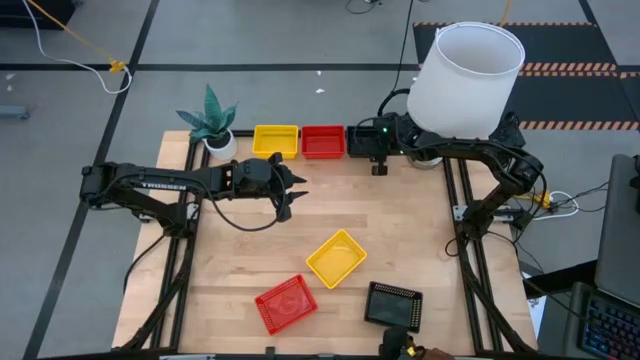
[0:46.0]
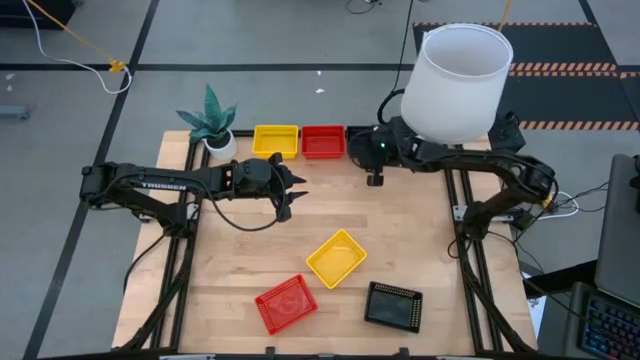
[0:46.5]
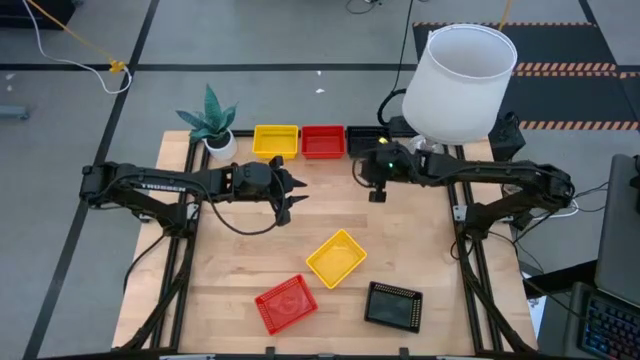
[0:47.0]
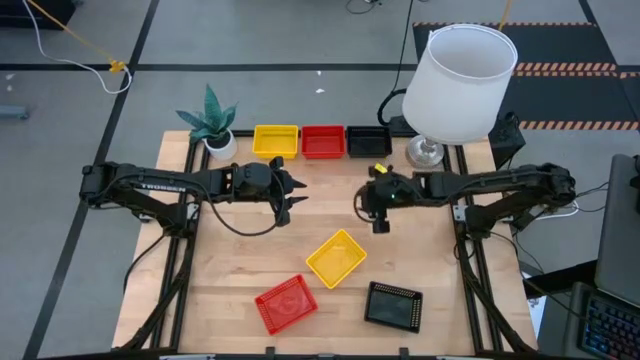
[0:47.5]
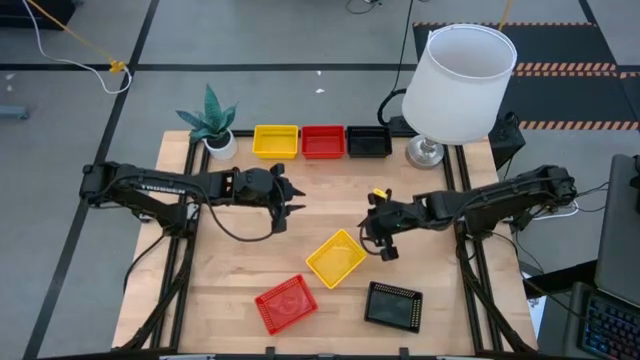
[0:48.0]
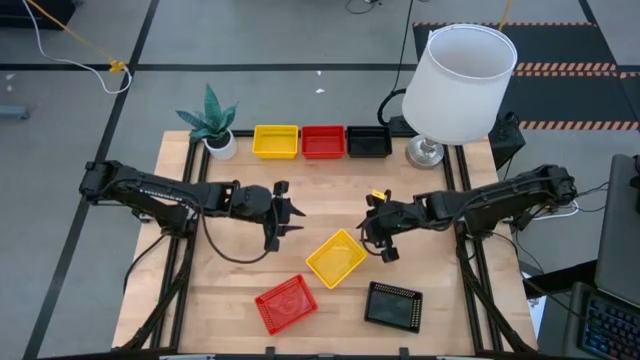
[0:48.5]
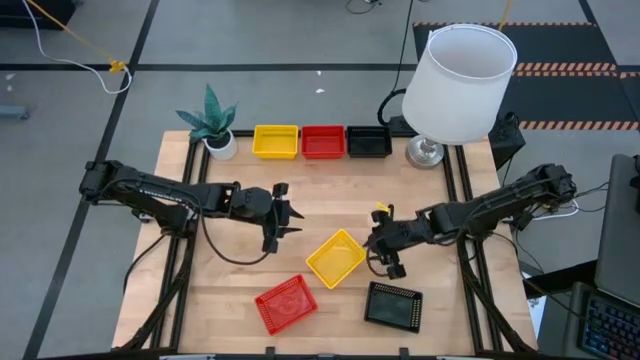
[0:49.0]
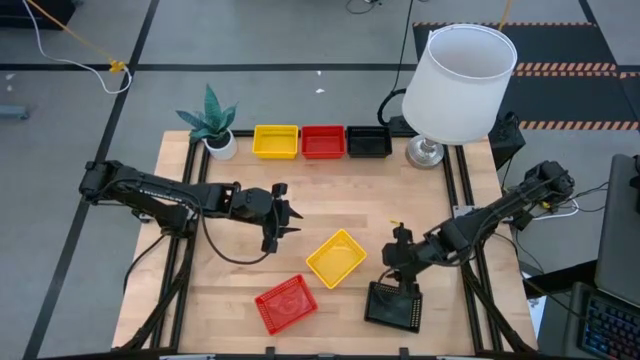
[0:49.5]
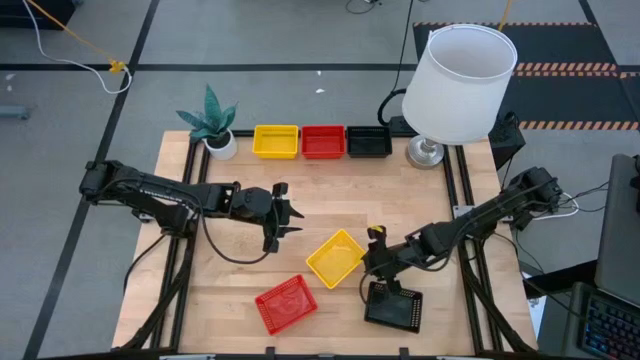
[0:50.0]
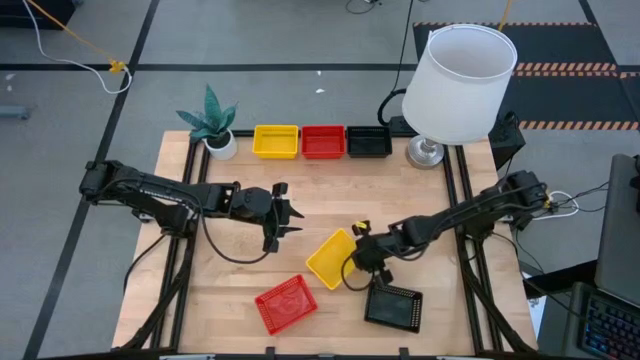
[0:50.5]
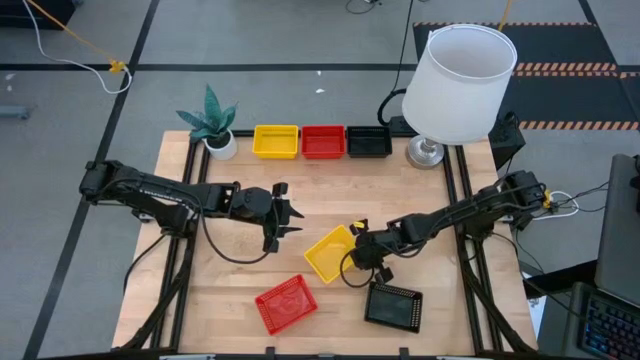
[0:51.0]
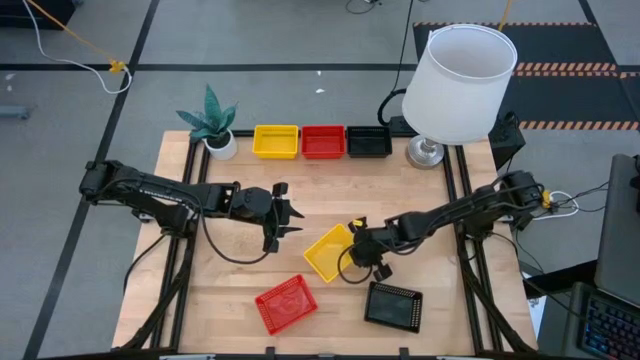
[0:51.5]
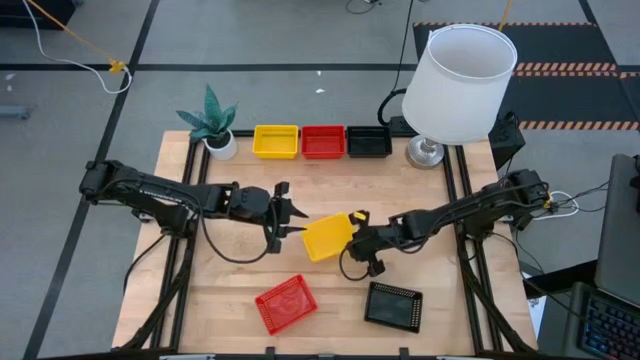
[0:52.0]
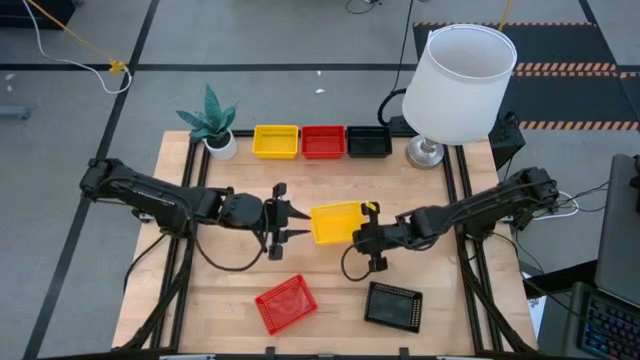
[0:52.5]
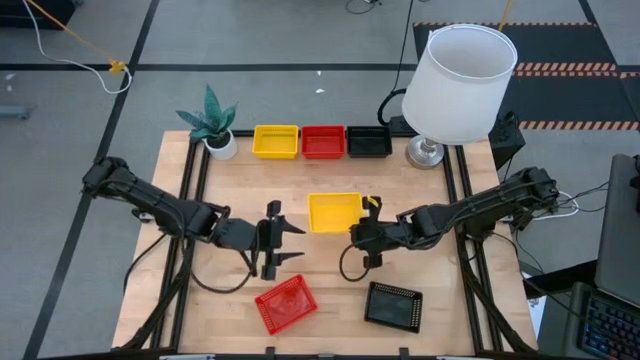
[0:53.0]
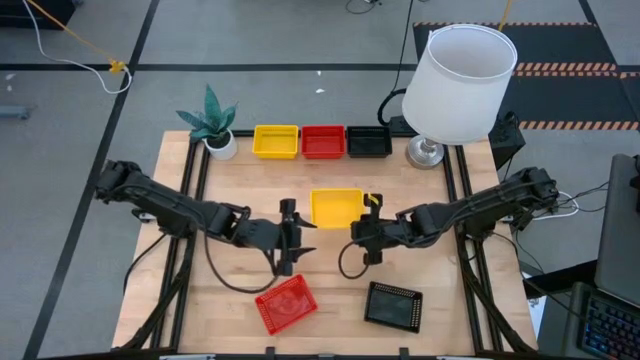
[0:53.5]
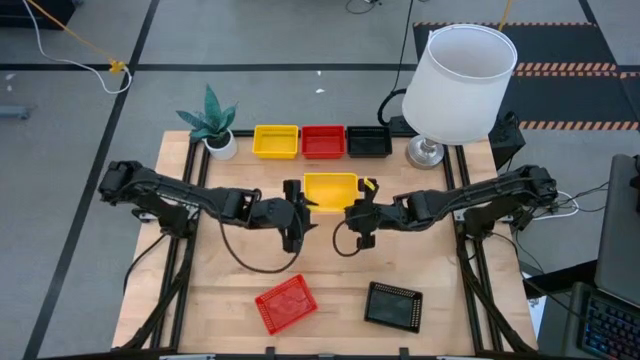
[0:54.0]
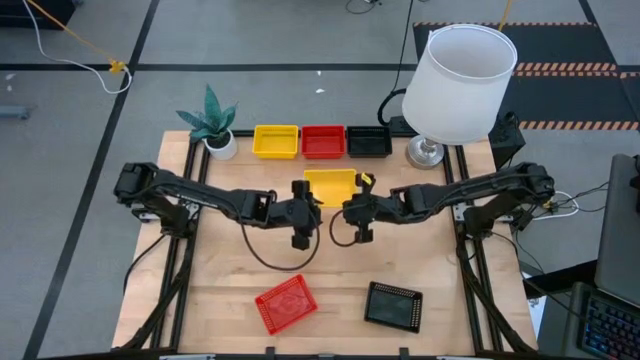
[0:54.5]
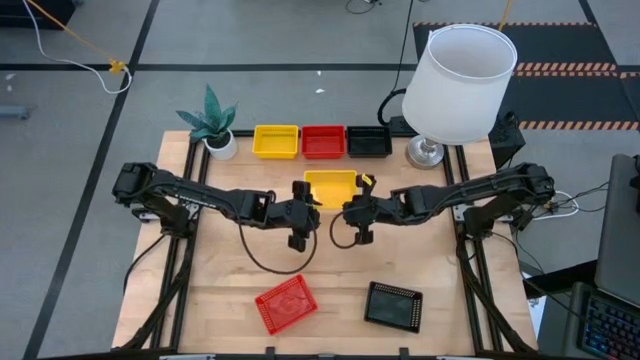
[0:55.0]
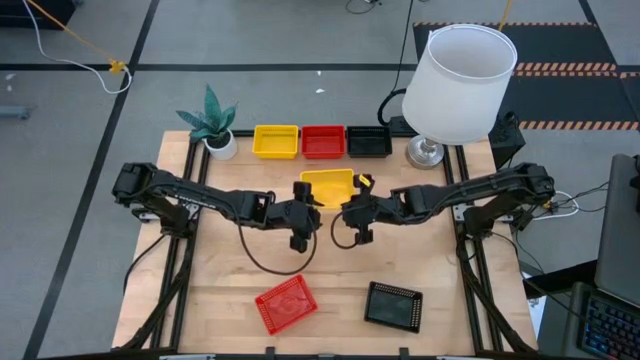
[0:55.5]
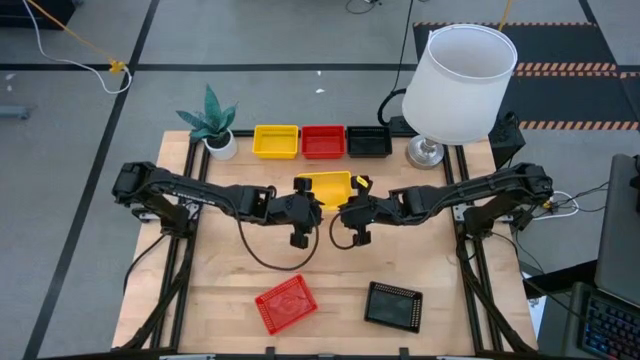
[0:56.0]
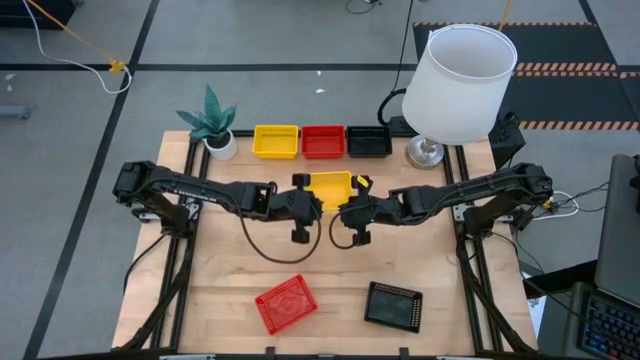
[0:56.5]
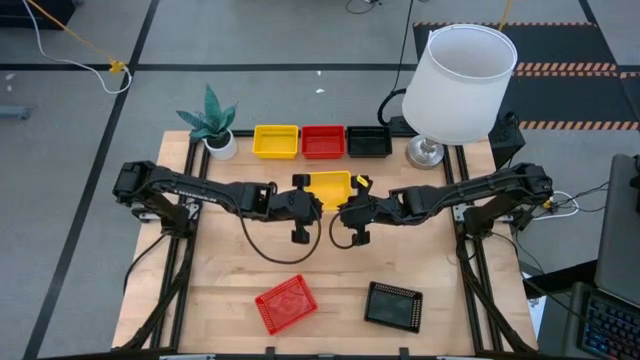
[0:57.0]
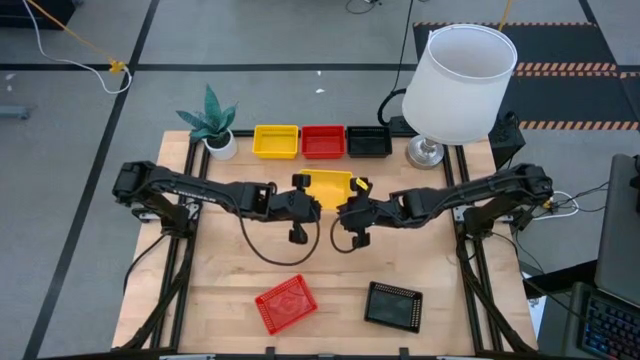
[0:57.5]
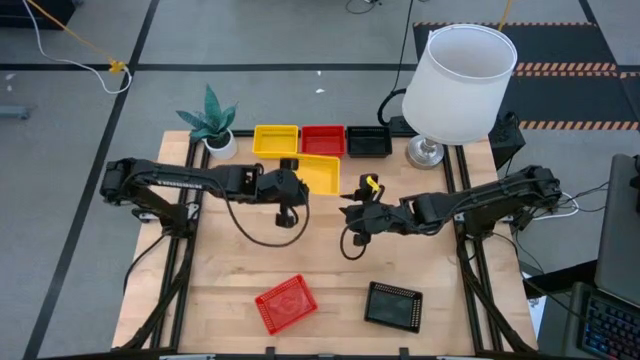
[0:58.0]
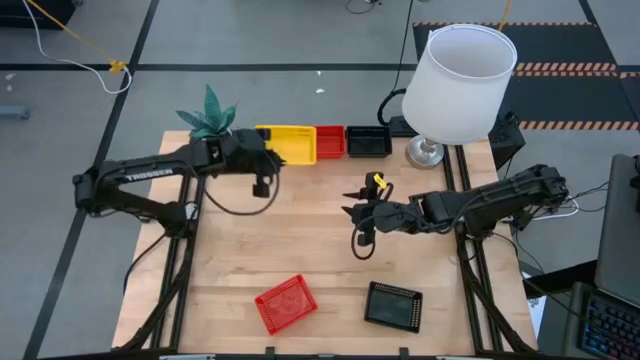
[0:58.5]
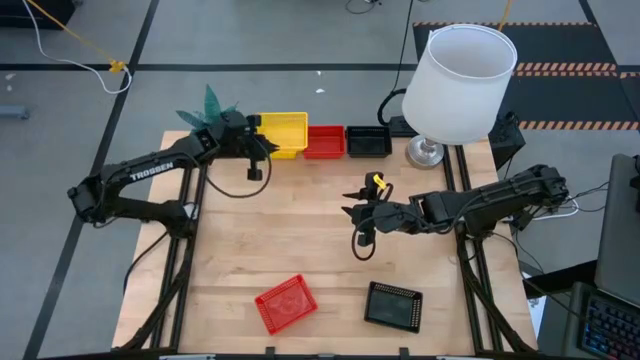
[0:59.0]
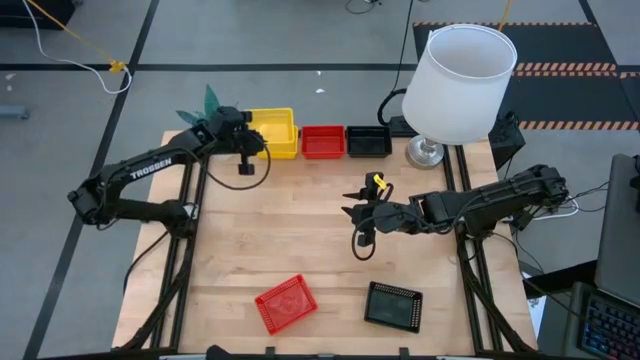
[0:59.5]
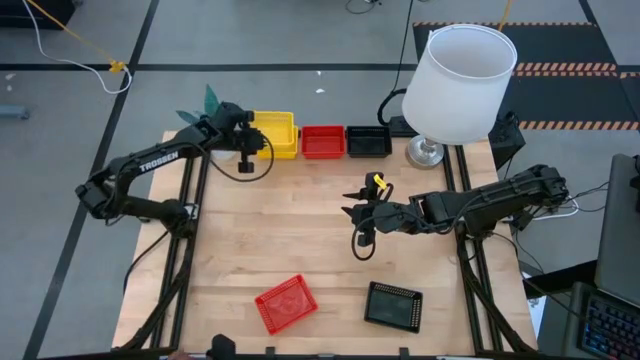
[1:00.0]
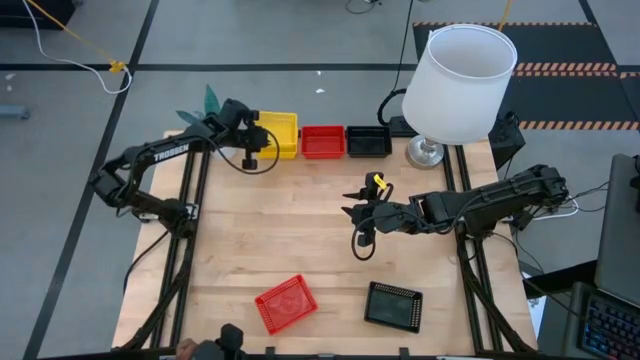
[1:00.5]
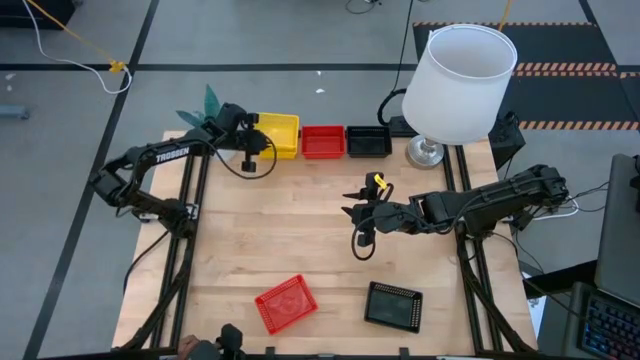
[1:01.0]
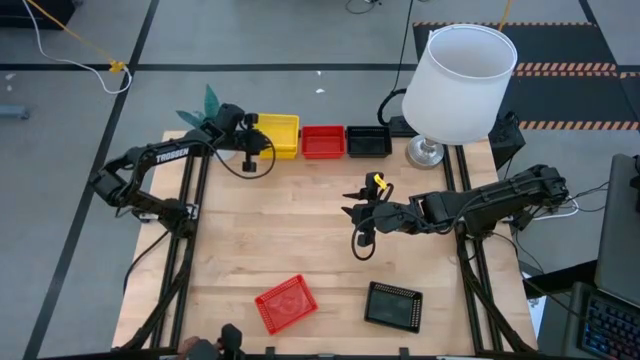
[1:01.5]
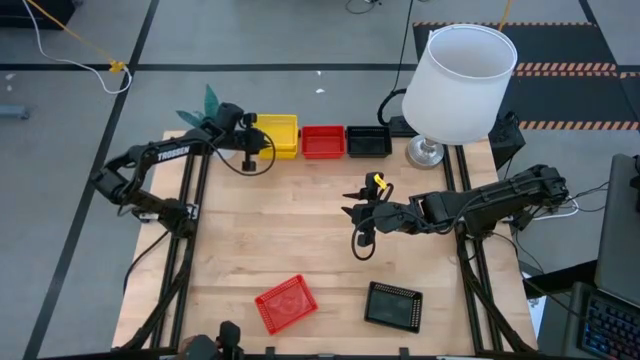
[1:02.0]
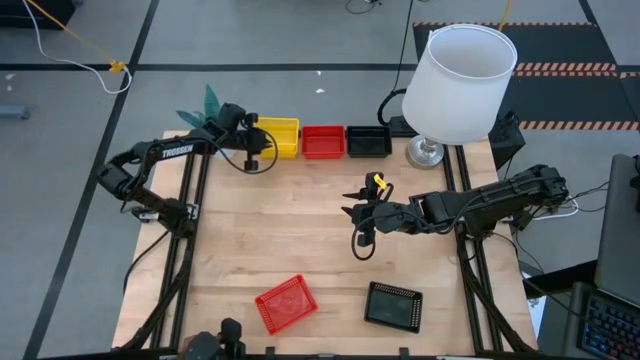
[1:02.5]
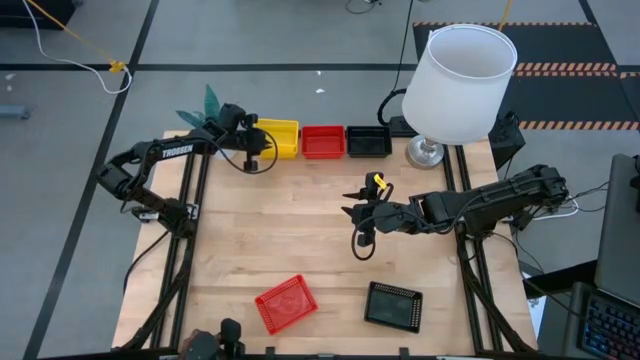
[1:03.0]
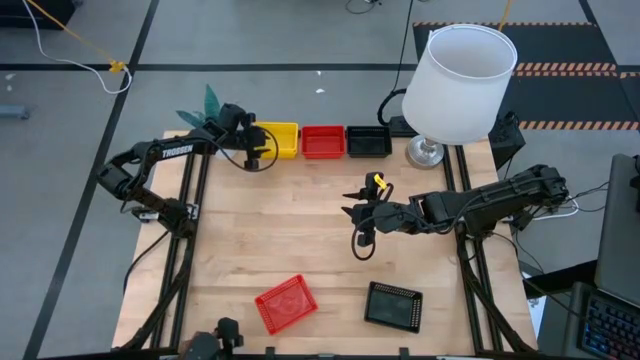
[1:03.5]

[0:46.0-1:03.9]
Stack the bottom yellow bin on the top stacked yellow bins
